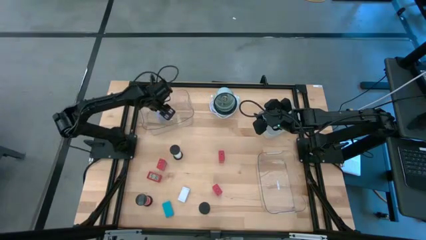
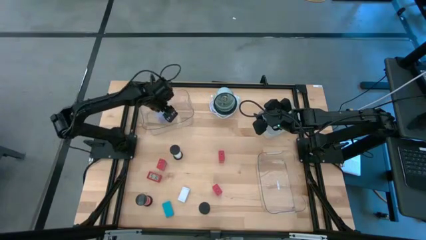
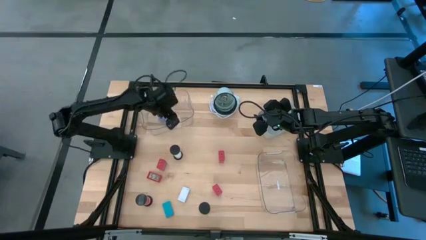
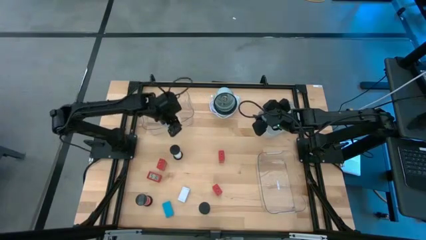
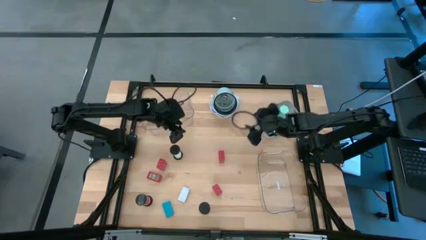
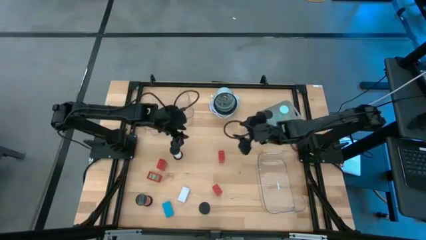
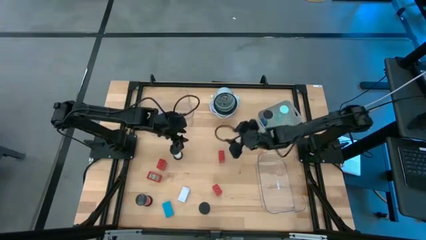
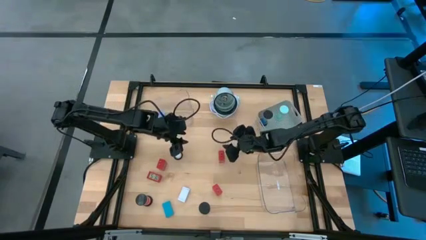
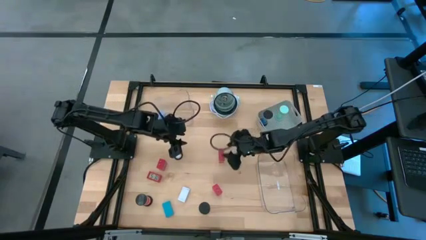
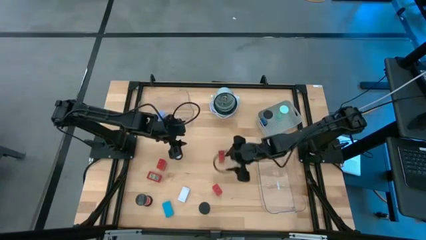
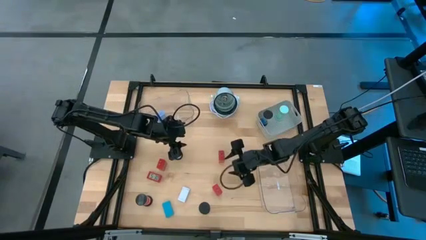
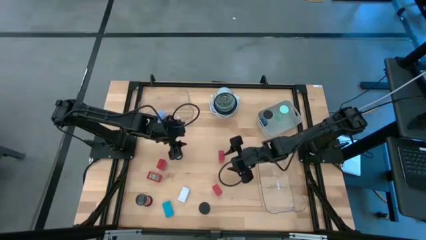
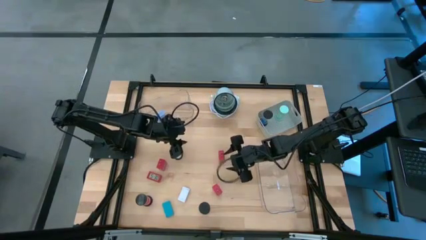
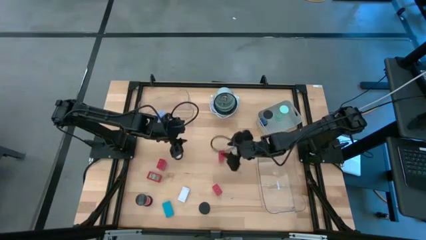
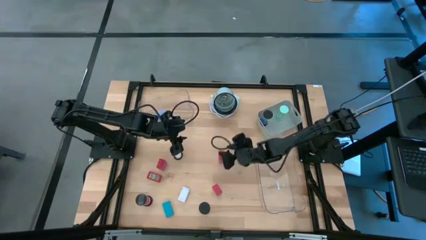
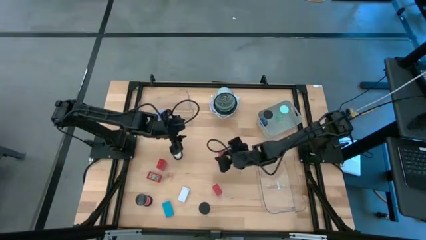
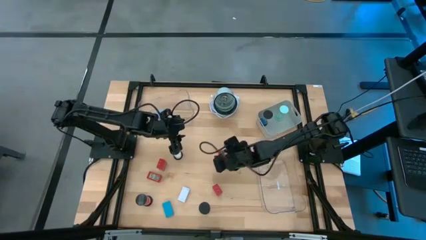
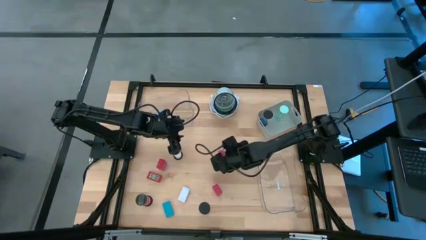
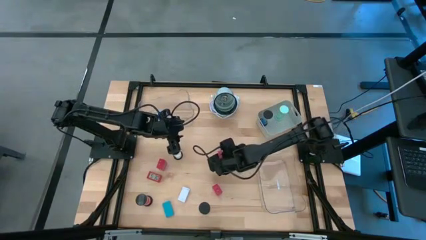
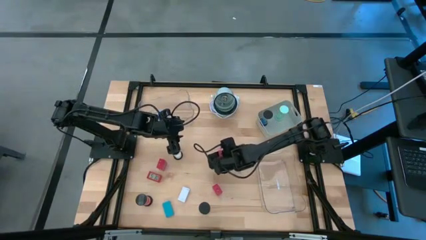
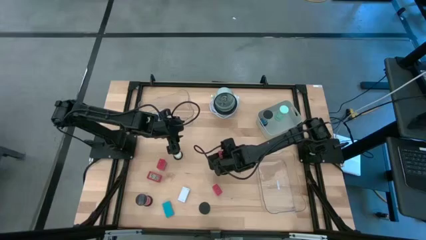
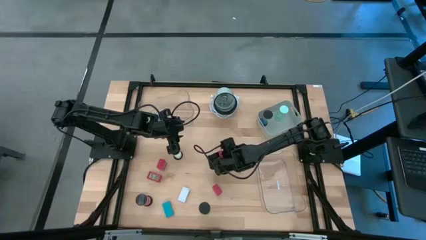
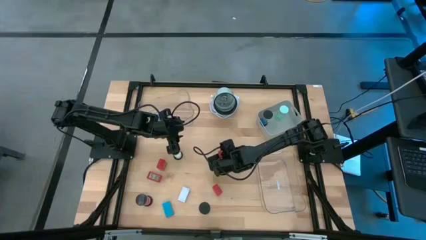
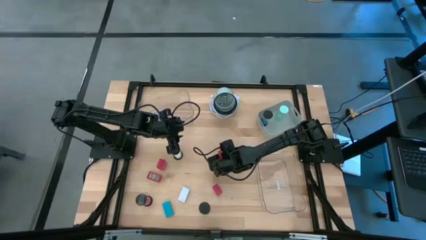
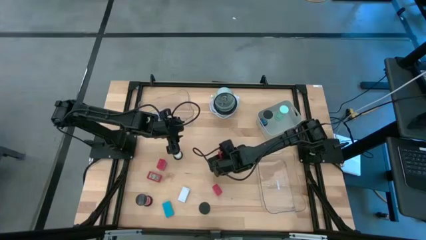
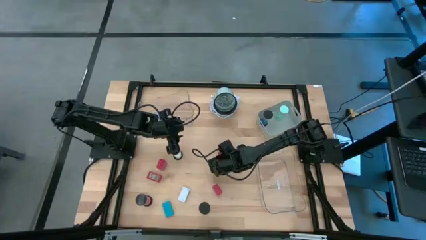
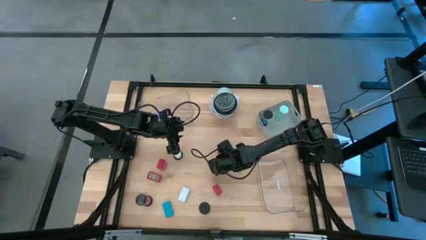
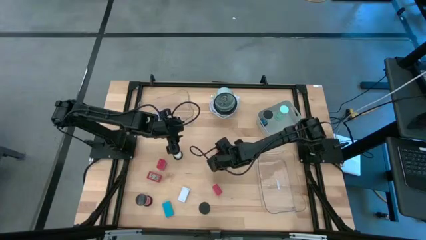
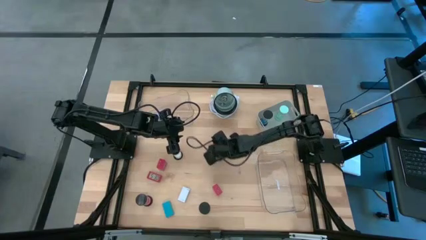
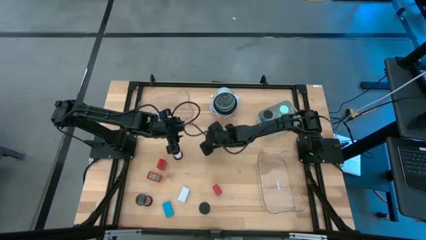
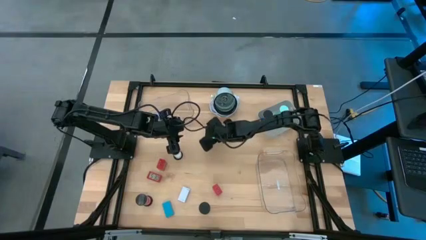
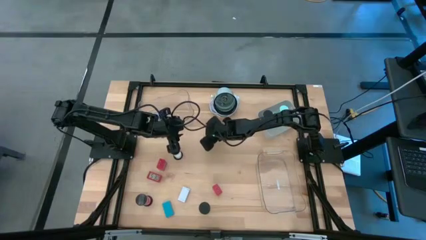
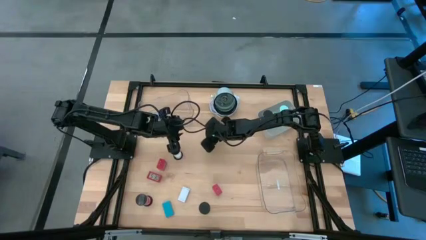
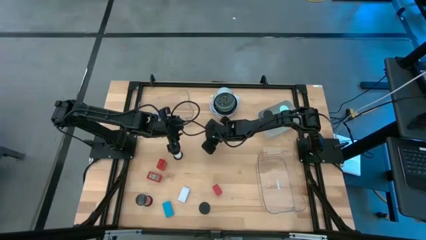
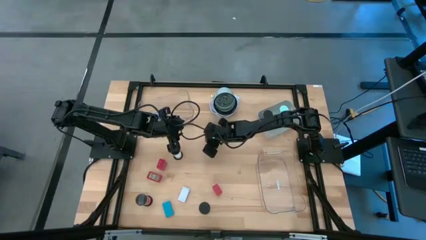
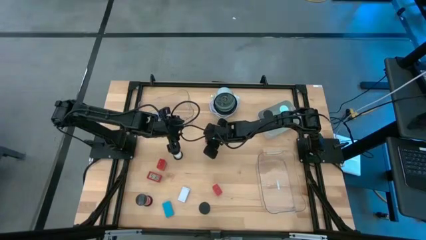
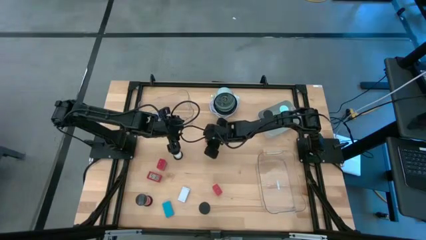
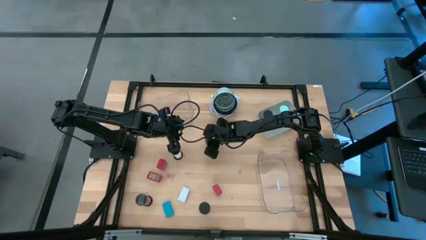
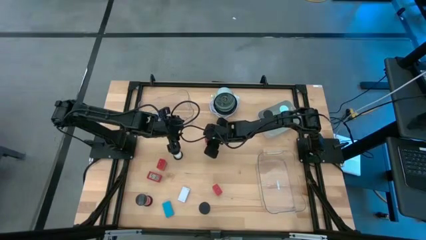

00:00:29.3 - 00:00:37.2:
Task: Pick & Place Office items
Move the top right red charger adapter to the top middle of the table

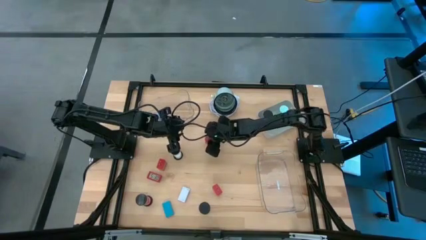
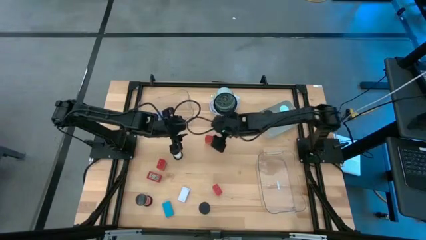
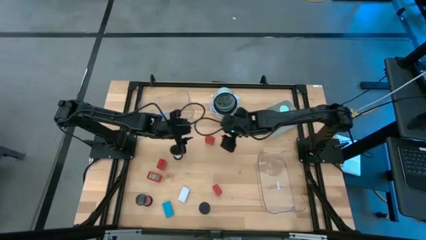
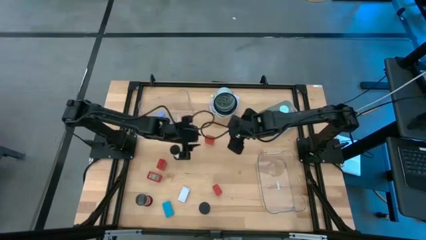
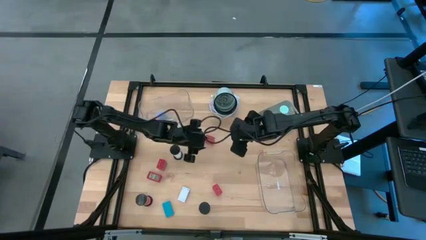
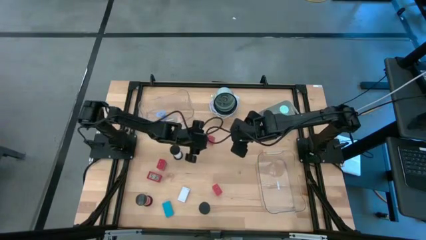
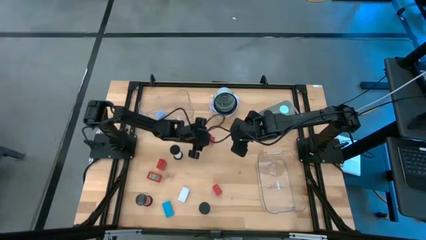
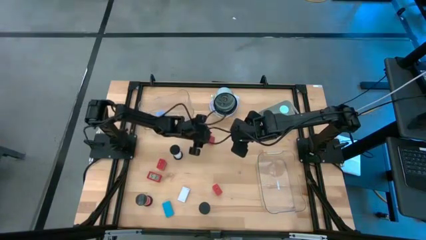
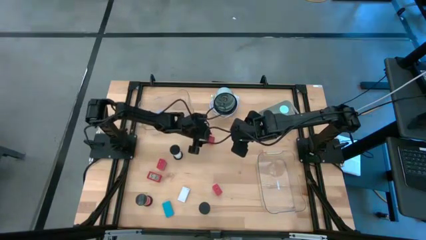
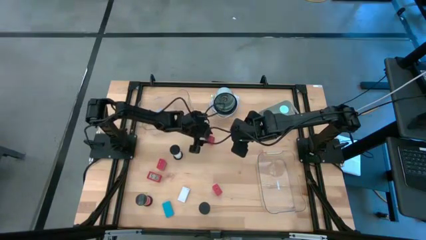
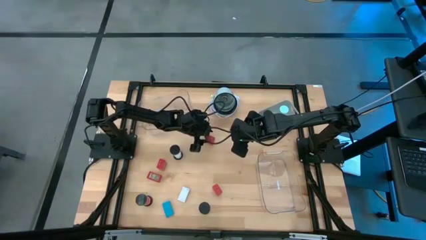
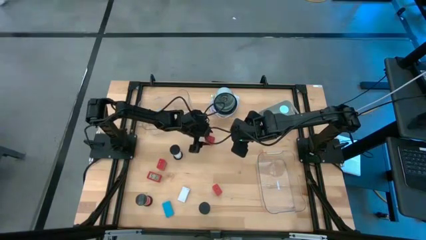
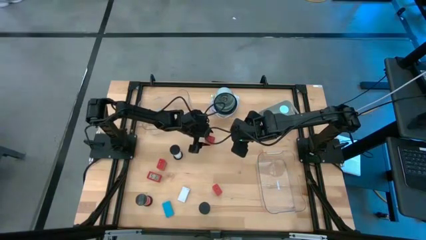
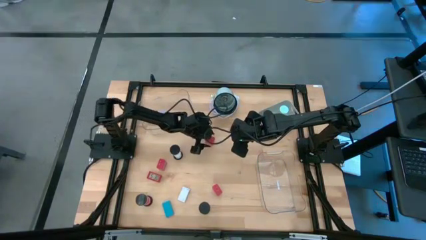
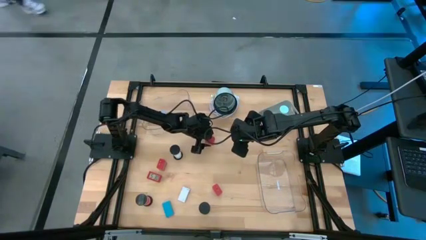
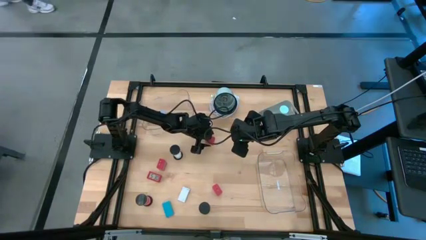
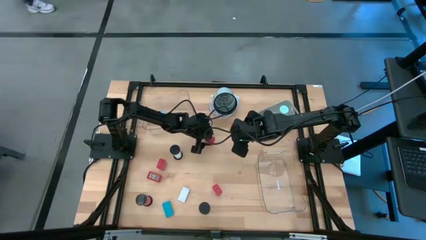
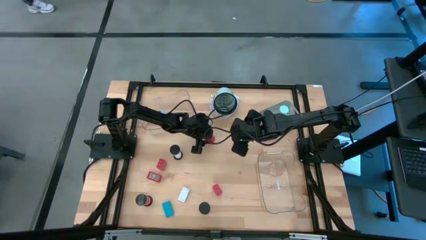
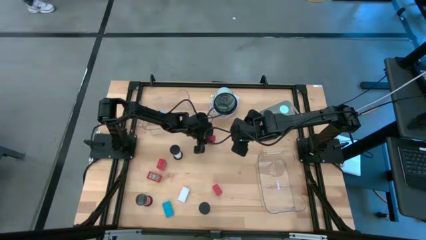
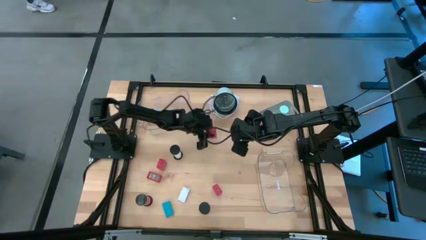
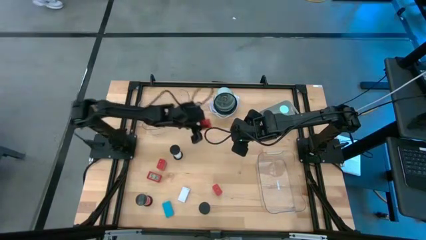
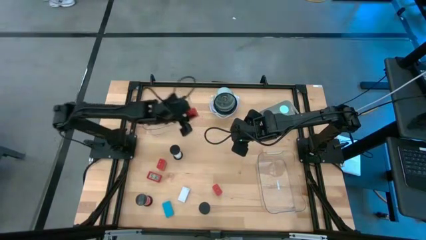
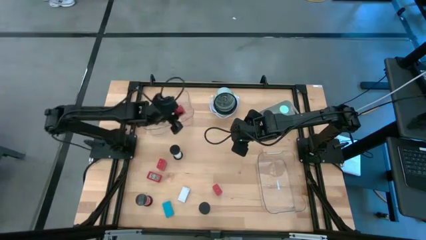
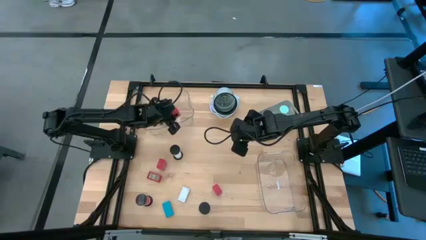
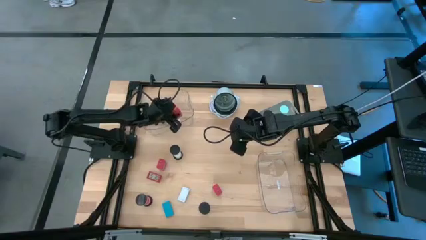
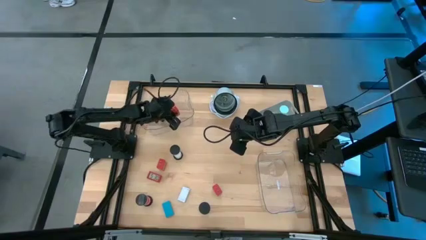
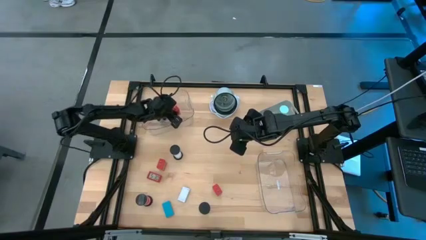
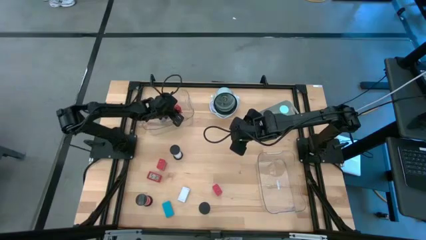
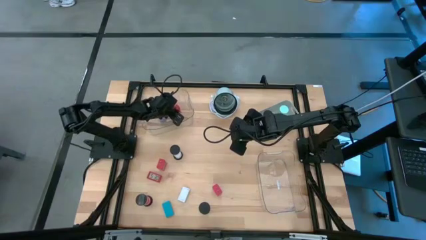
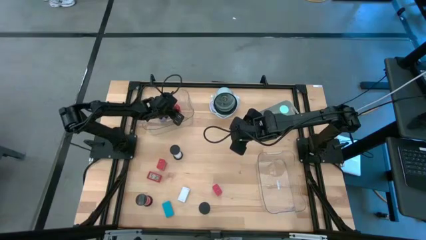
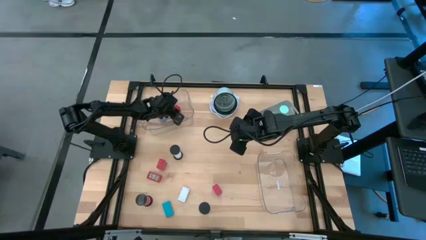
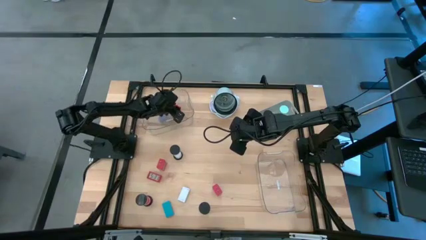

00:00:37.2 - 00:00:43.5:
Put the top right red charger adapter into the left transparent bin

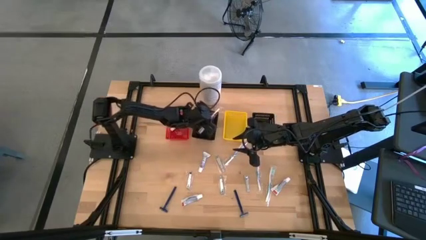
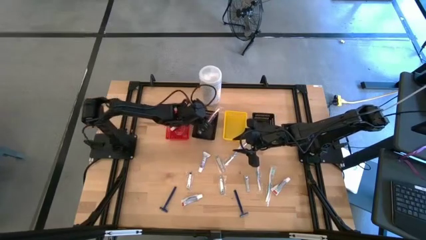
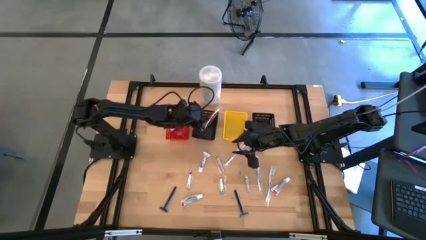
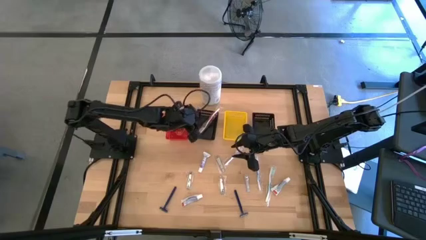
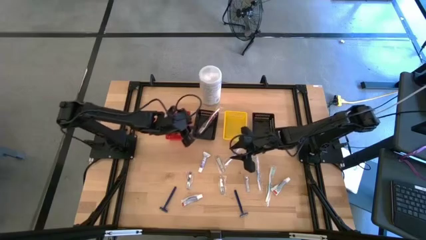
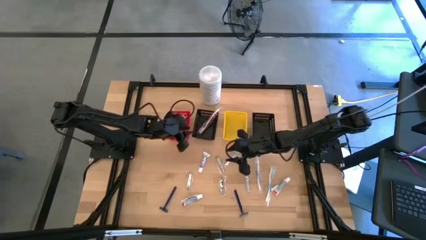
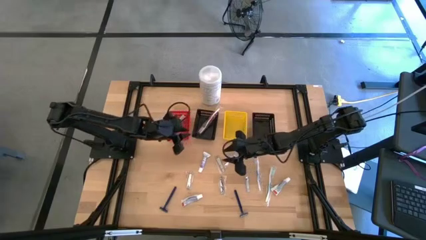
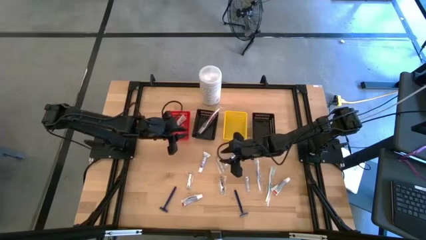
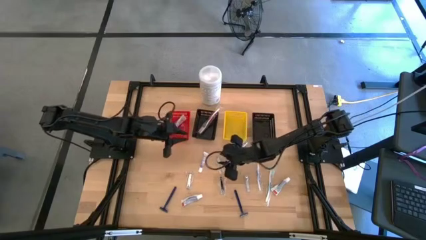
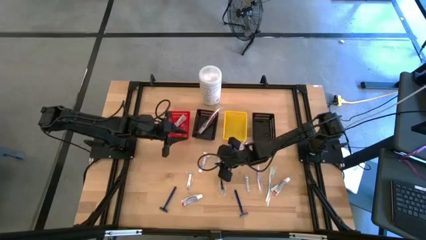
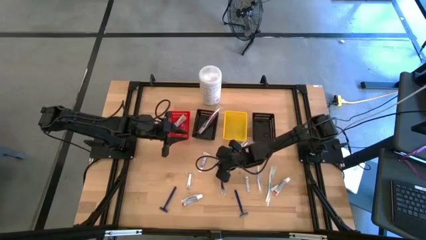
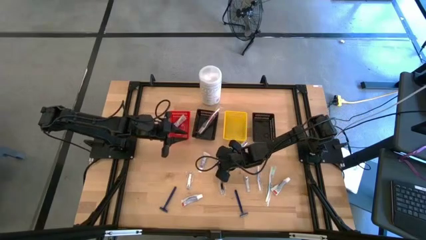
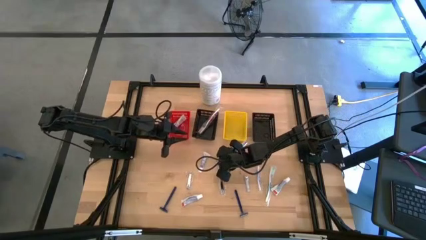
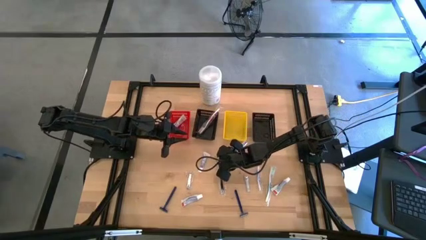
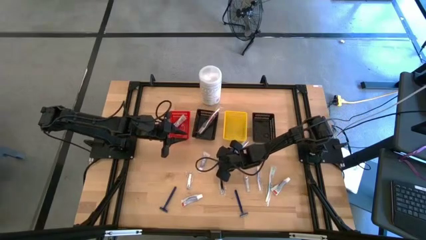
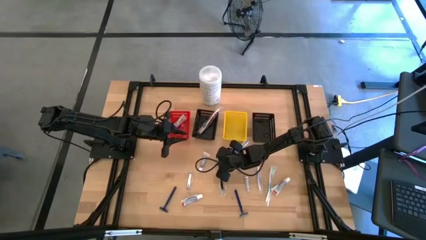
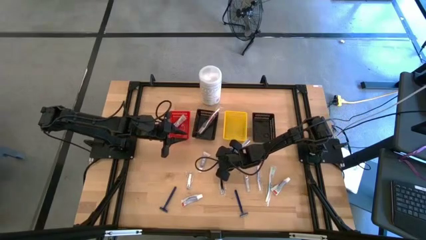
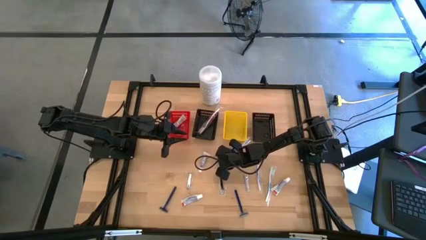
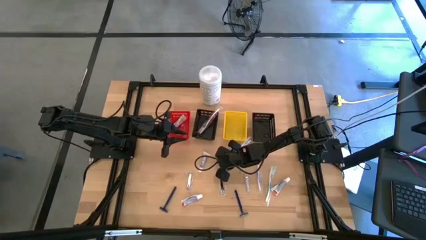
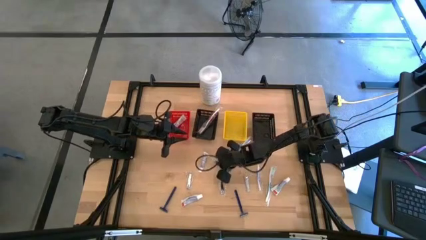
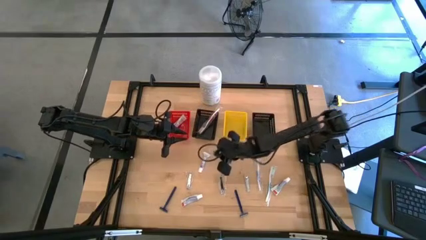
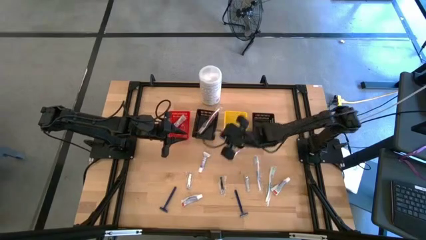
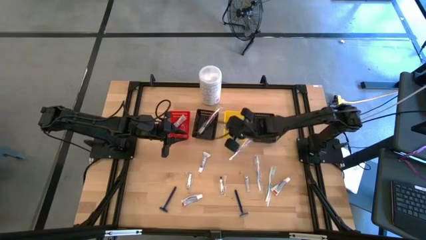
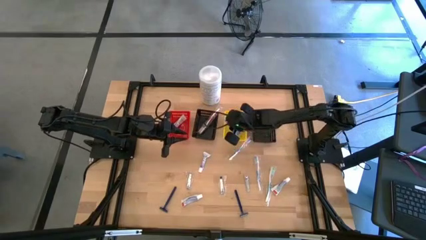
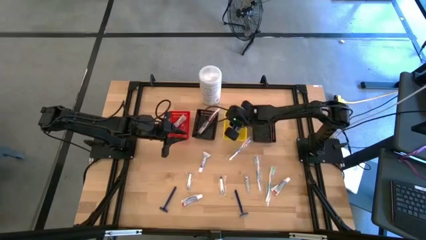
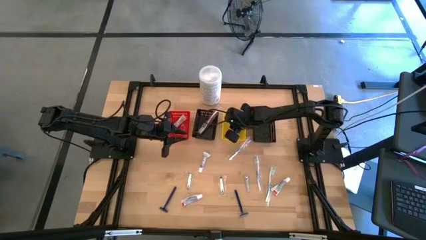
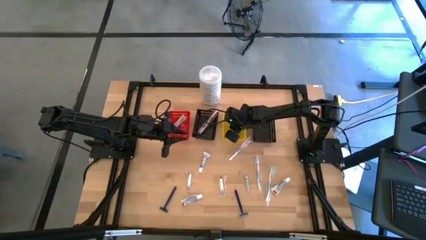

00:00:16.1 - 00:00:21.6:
Task: Pick & Place Travel size toiletries
Put the nail cutter into the yellow basket
